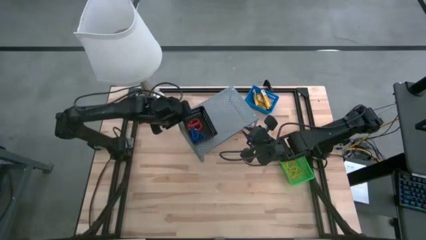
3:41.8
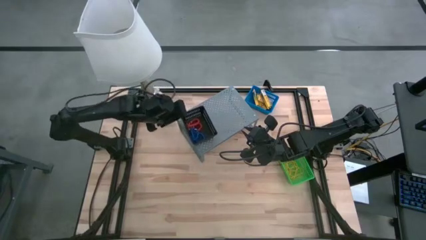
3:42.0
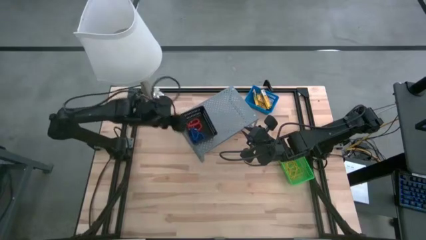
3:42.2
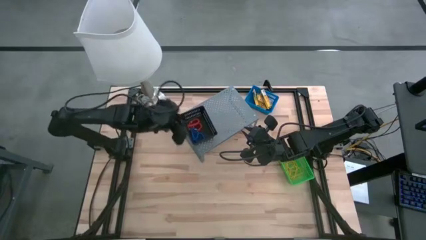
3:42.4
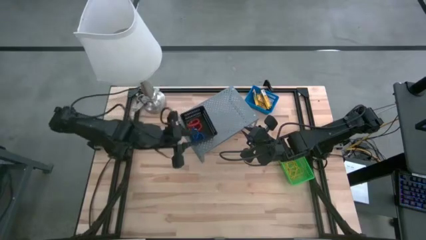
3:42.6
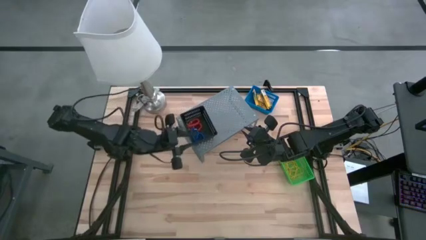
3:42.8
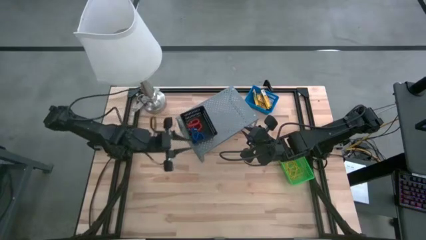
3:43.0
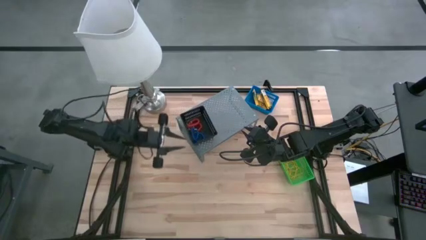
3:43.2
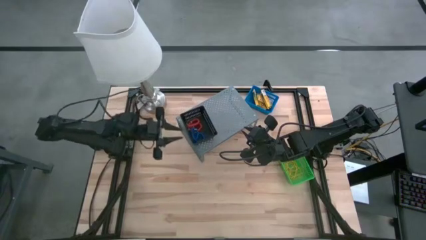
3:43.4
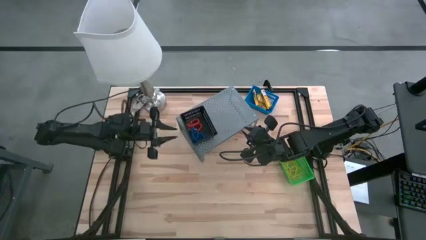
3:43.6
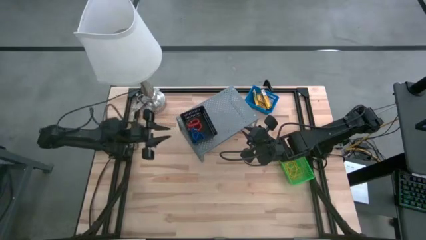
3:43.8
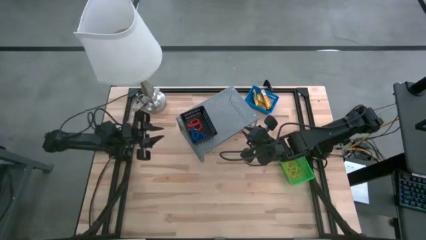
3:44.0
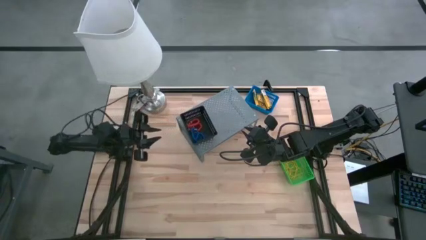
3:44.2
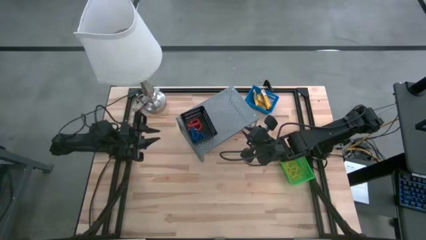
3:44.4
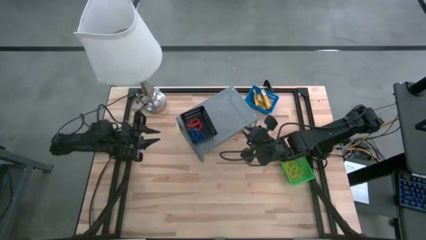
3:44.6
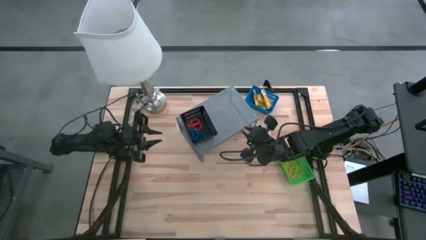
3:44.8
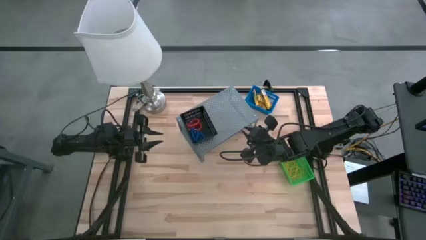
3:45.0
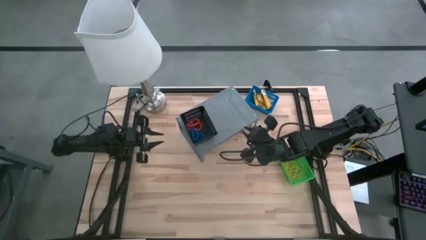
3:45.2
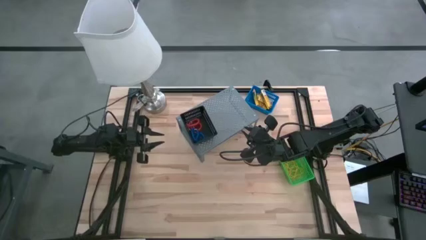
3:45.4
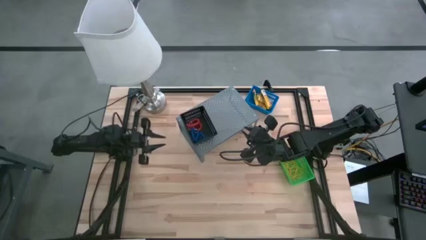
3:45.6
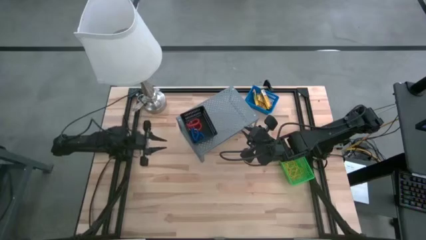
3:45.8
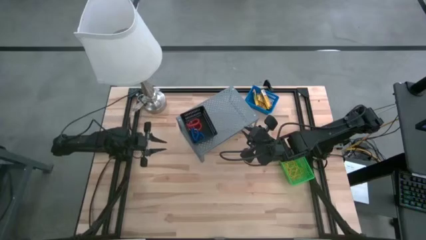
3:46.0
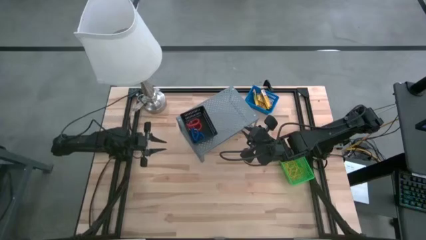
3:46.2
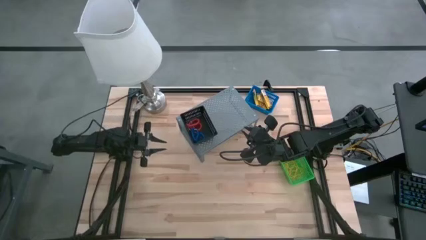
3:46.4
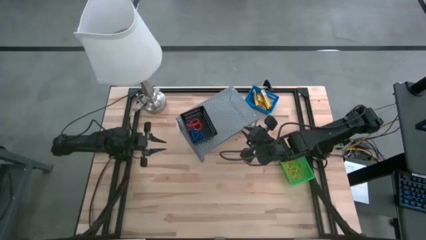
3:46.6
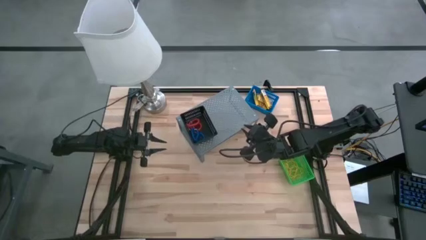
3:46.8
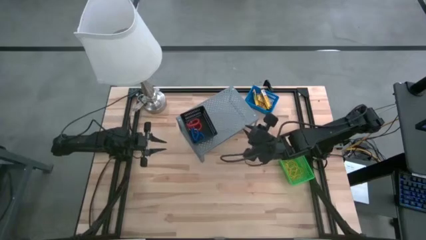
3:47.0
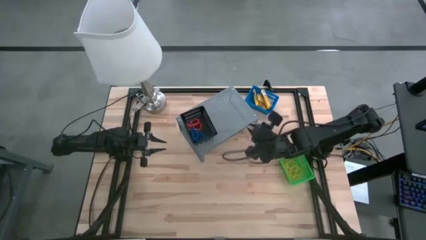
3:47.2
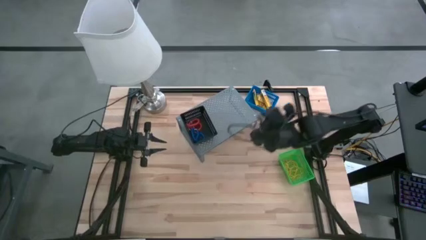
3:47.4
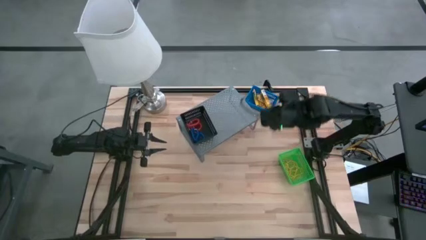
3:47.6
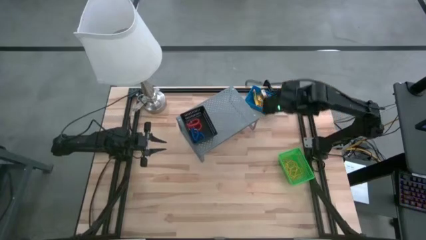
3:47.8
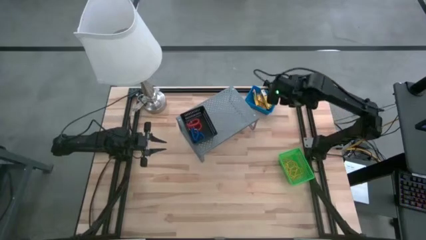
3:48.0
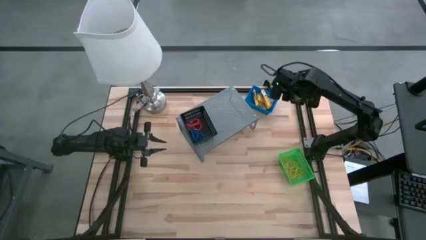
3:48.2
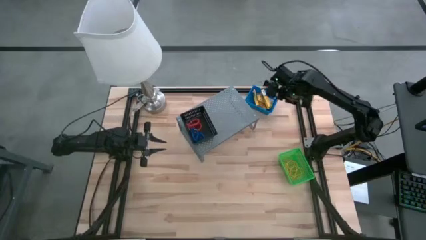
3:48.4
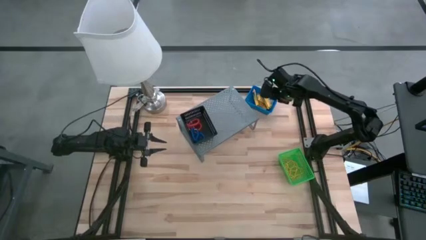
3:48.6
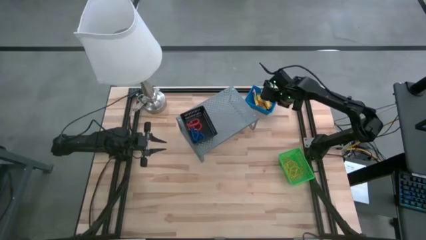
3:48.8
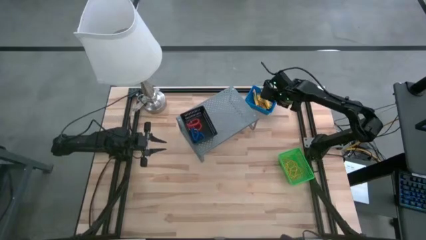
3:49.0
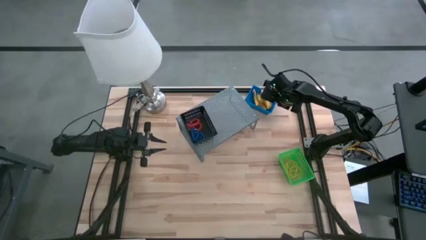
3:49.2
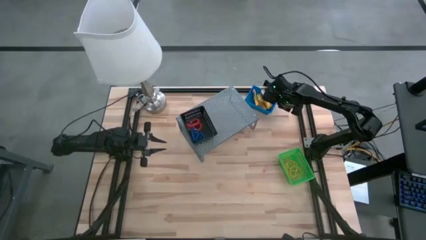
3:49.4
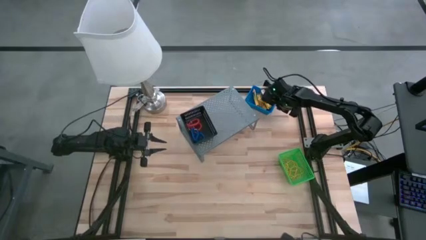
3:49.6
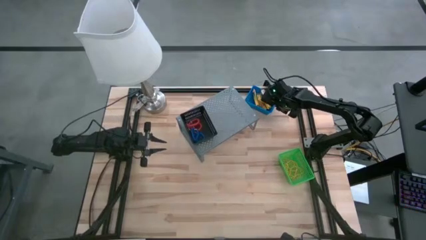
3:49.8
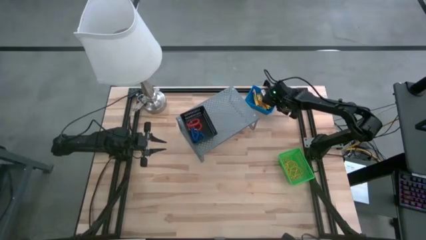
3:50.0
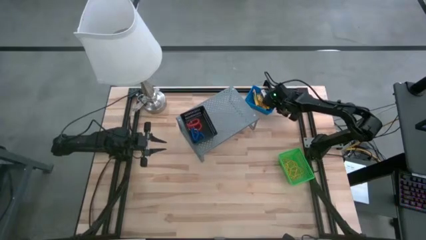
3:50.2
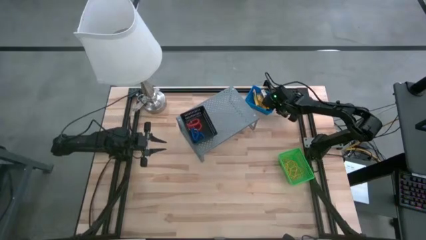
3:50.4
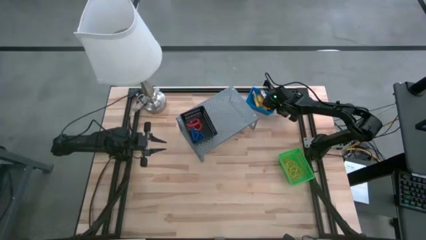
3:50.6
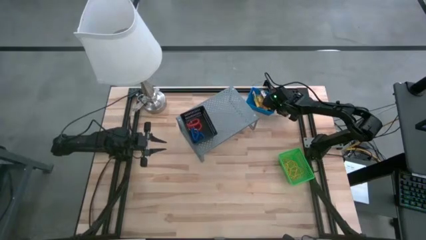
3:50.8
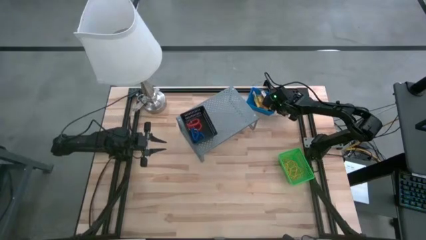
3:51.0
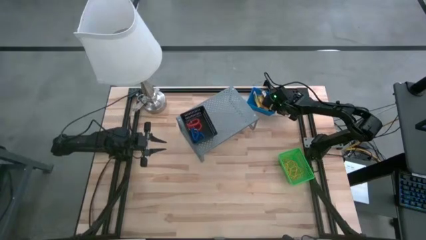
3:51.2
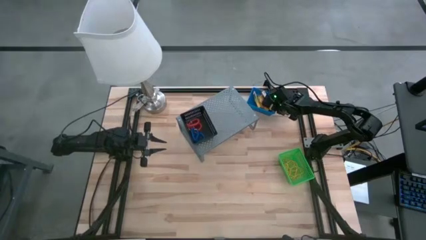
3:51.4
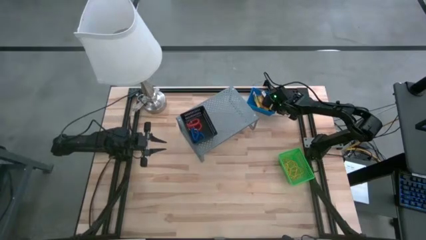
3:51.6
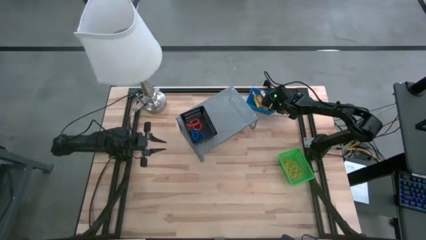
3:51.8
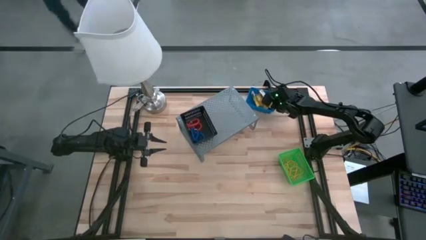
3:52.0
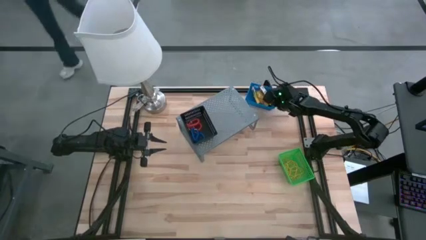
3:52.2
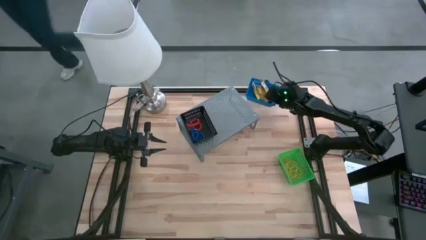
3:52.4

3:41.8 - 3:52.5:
Task: Pick & Place Office Desk Supplies
Put the blue basket filled with crayon boxes on the shelf
